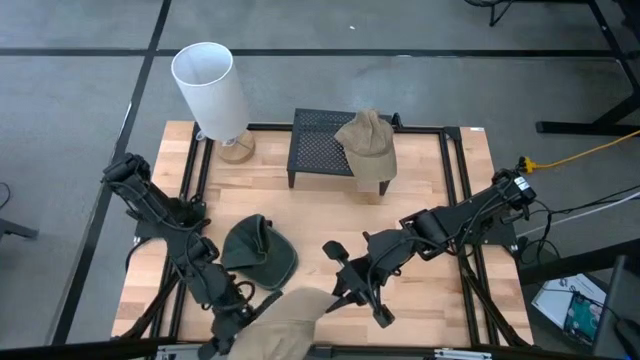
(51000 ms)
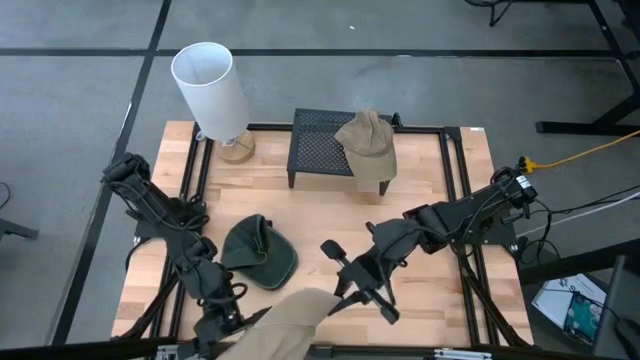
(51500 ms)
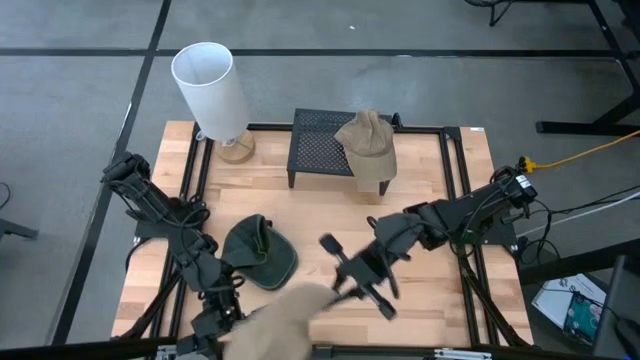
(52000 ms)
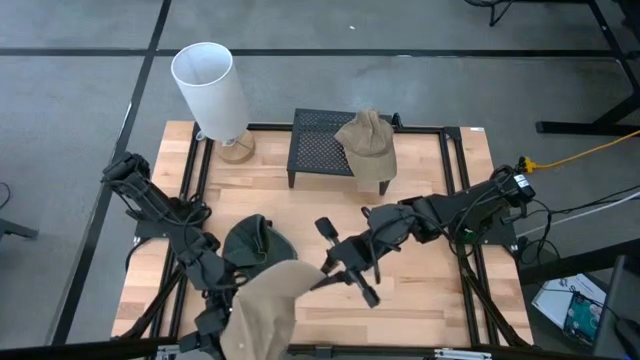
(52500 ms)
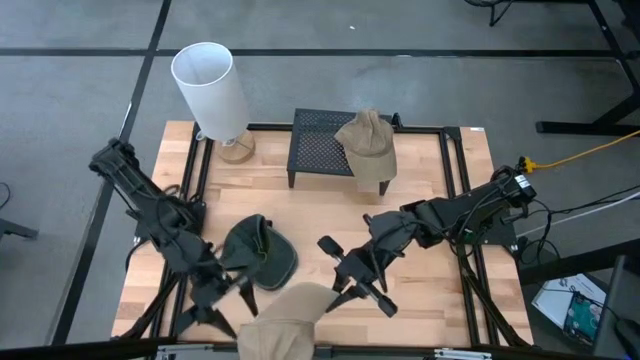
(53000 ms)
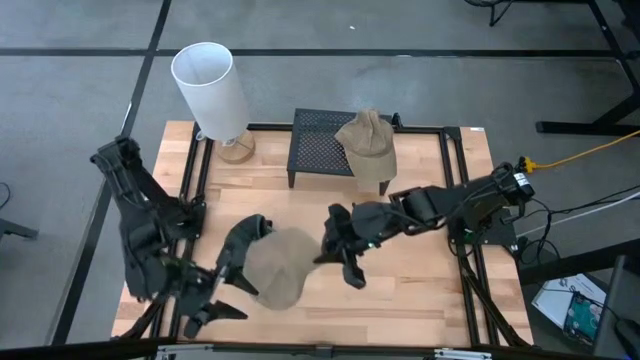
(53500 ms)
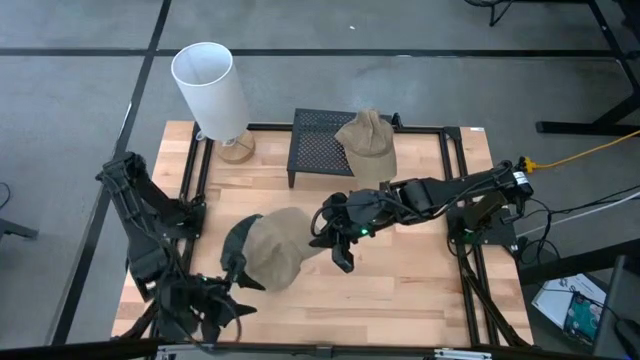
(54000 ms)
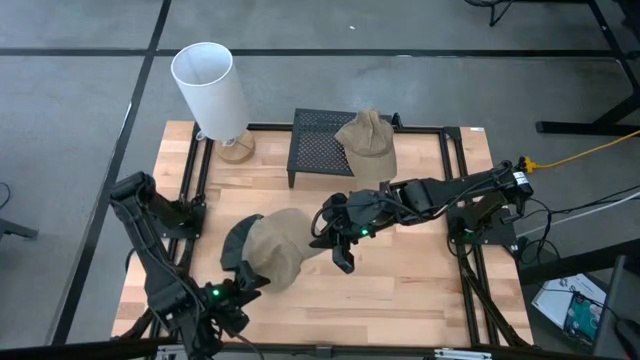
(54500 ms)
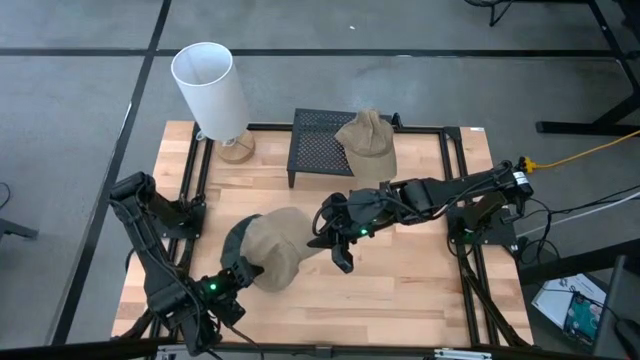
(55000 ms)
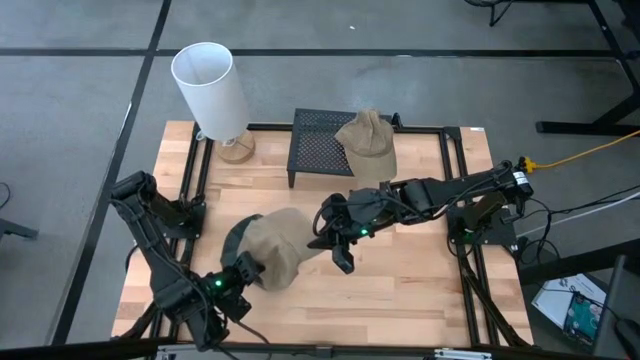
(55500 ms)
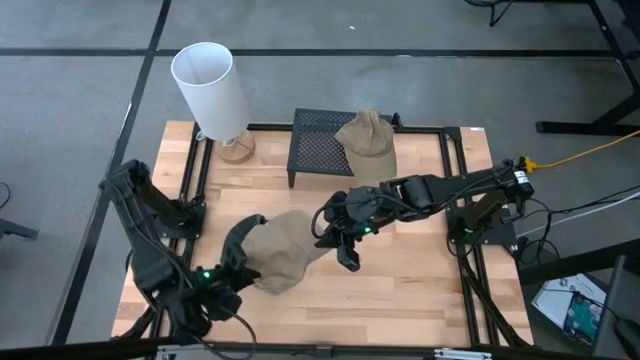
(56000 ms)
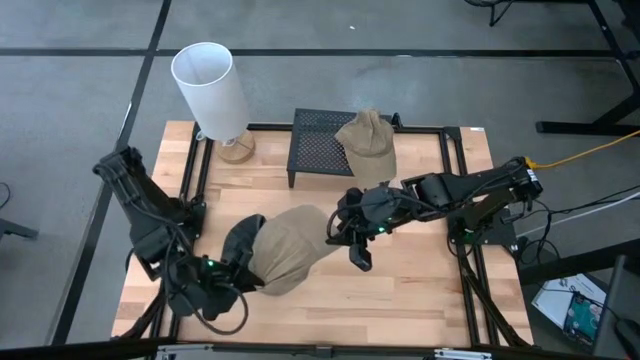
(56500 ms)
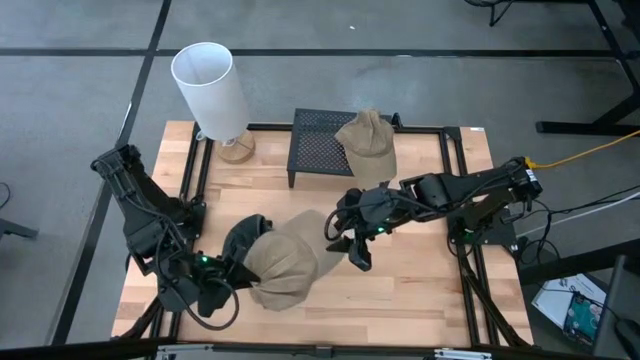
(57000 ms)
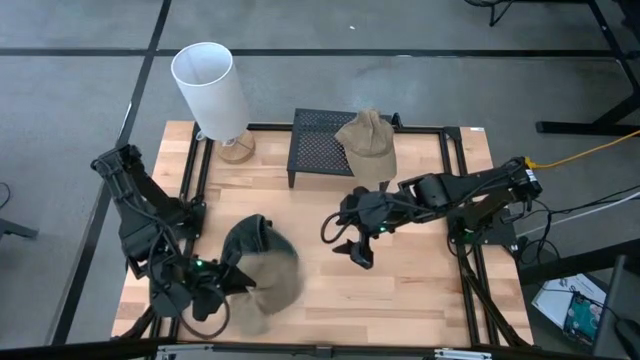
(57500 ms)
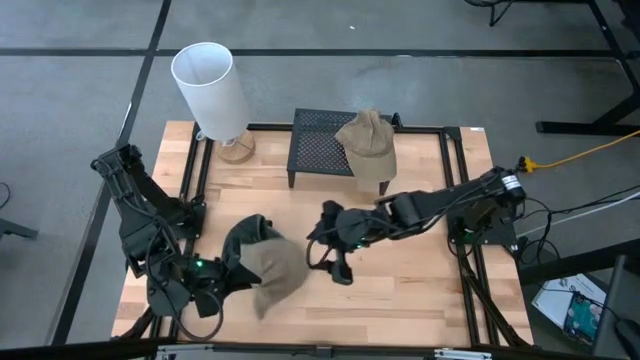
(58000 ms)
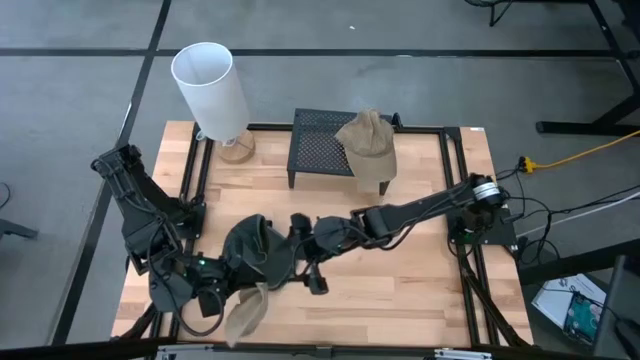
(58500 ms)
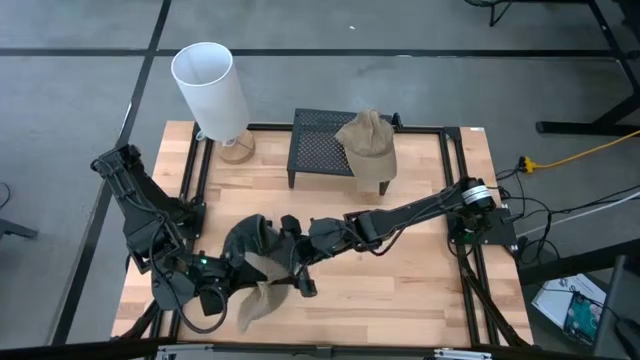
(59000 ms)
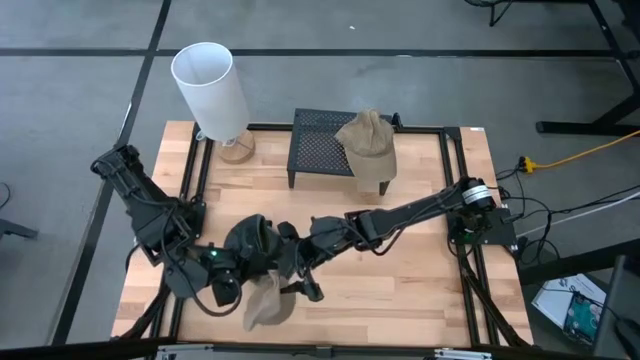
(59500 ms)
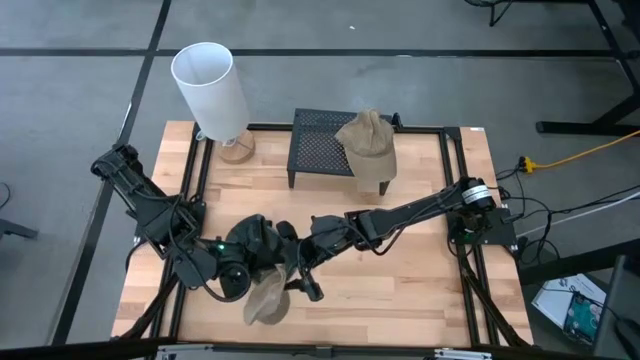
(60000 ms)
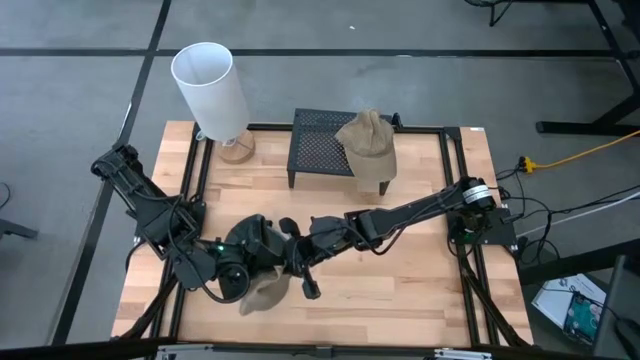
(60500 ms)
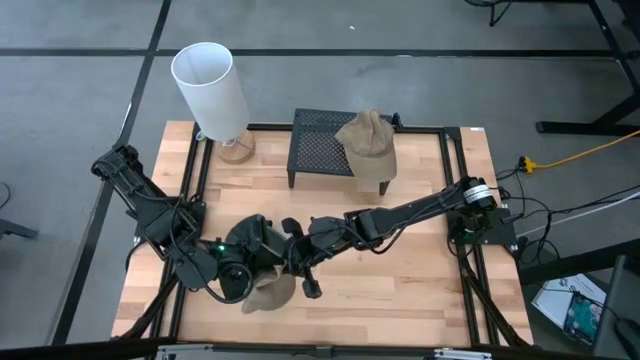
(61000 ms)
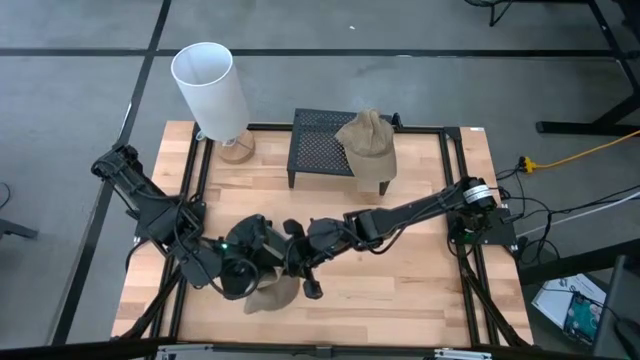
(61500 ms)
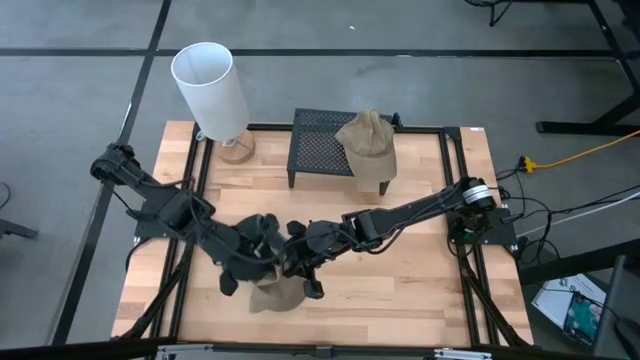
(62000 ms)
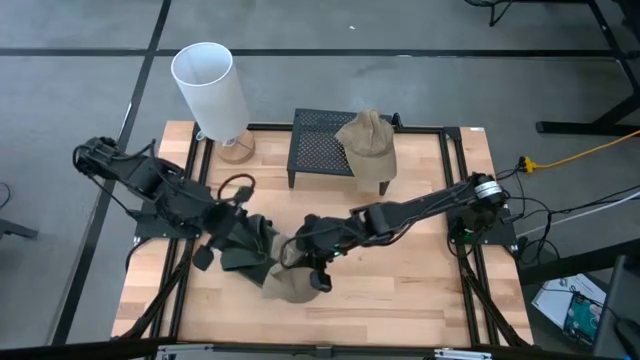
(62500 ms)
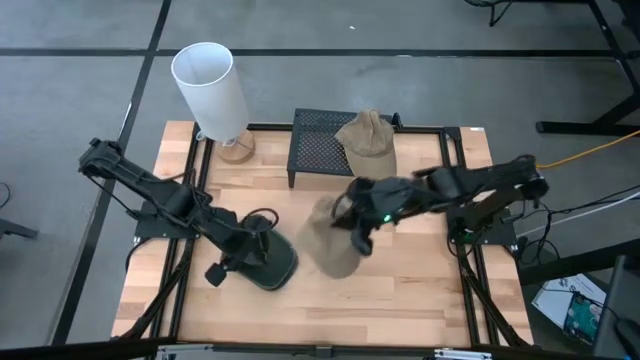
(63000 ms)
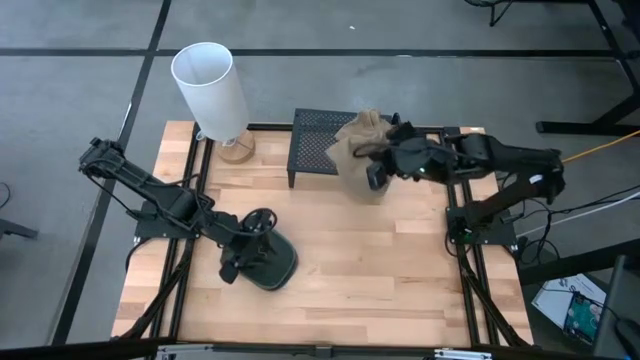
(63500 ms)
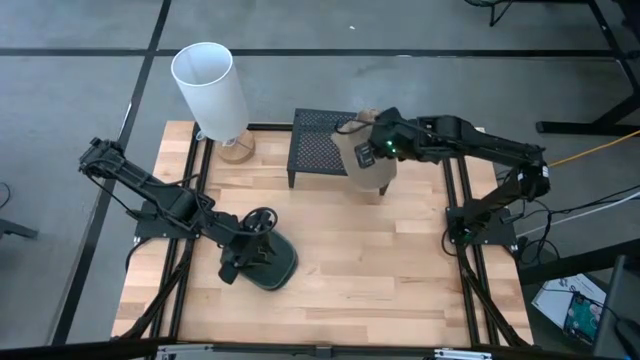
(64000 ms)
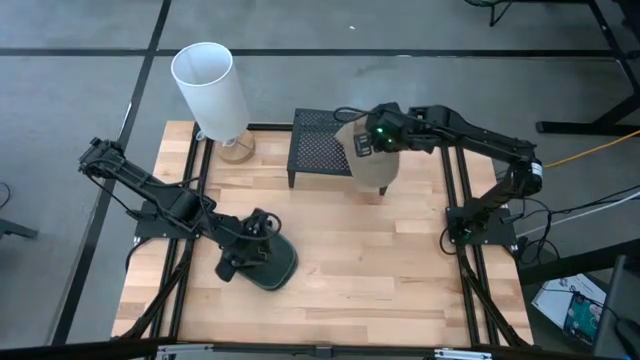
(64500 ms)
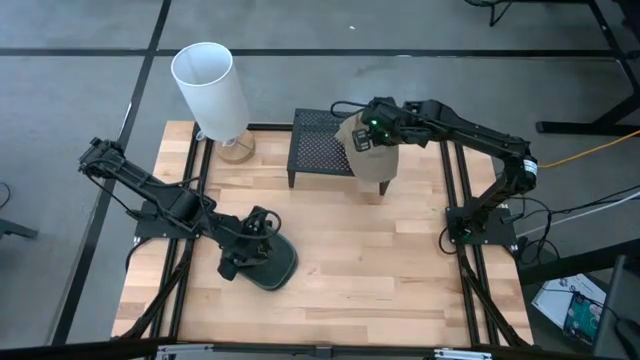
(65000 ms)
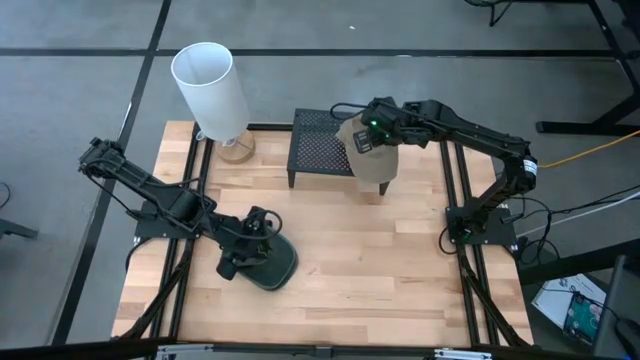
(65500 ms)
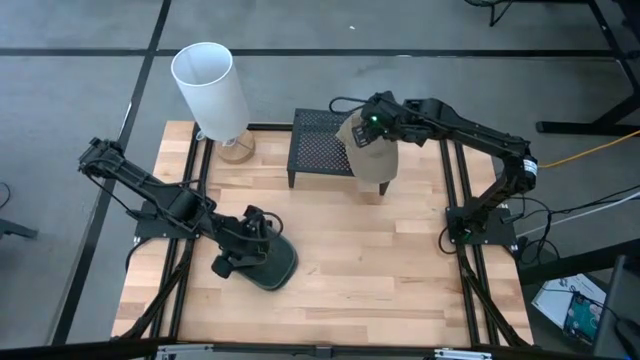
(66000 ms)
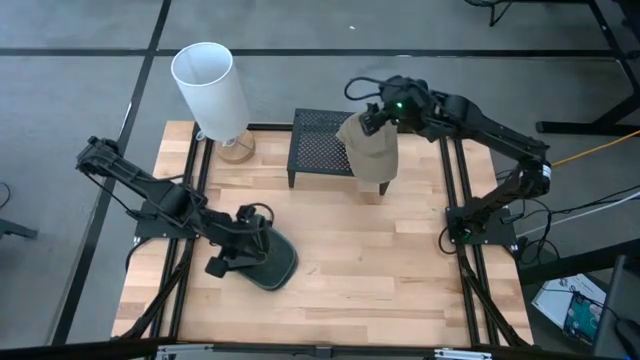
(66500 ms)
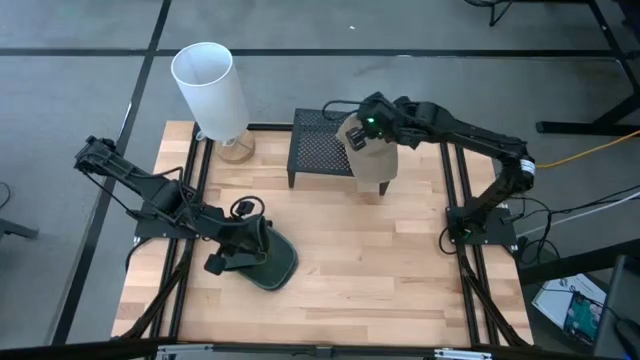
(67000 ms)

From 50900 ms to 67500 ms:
Task: Pick & Place hat
Put the brown cap on the shelf
